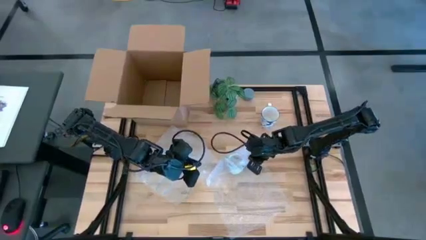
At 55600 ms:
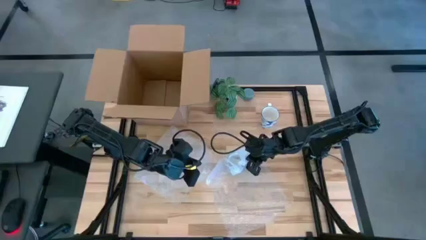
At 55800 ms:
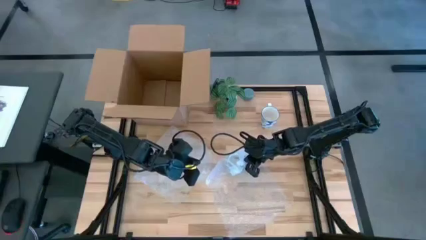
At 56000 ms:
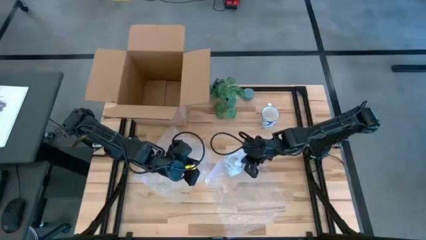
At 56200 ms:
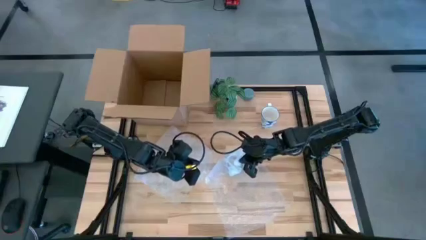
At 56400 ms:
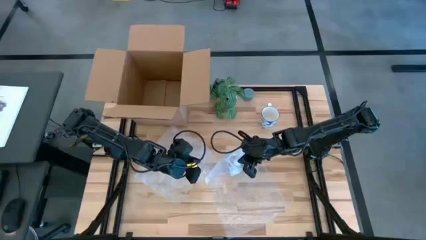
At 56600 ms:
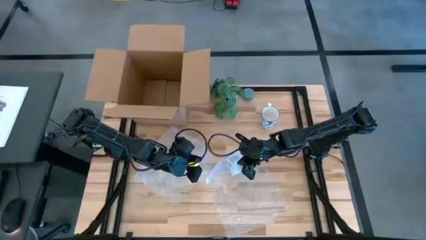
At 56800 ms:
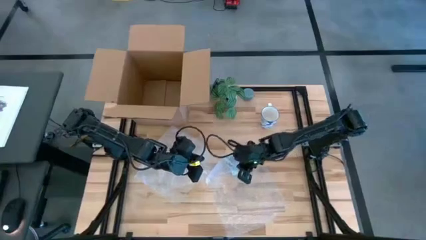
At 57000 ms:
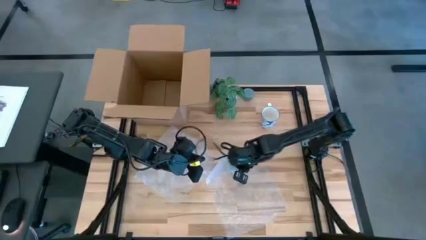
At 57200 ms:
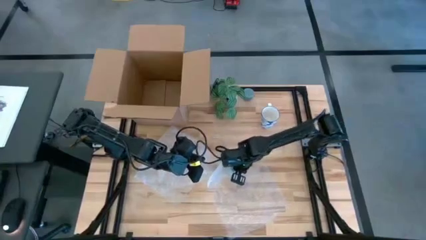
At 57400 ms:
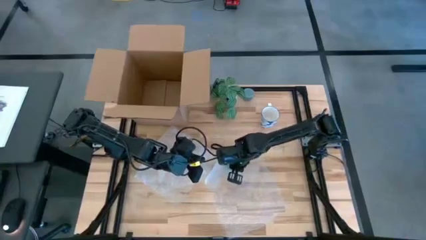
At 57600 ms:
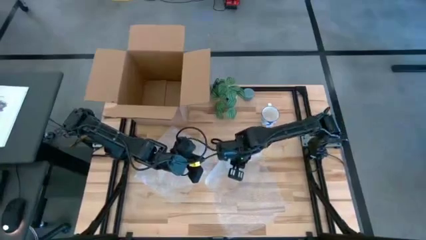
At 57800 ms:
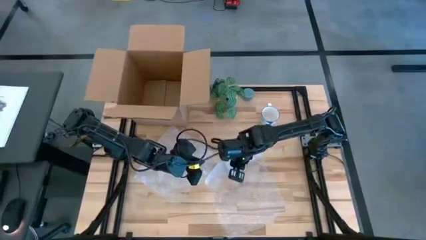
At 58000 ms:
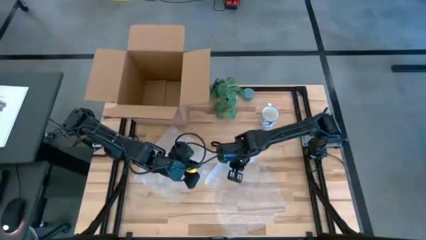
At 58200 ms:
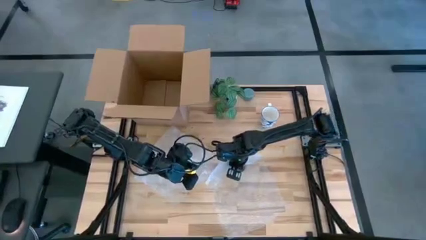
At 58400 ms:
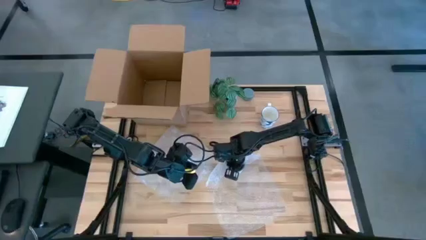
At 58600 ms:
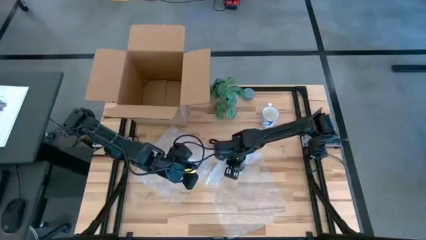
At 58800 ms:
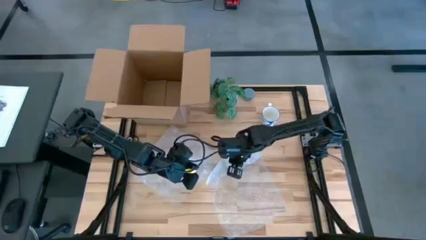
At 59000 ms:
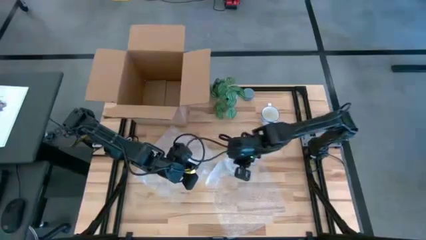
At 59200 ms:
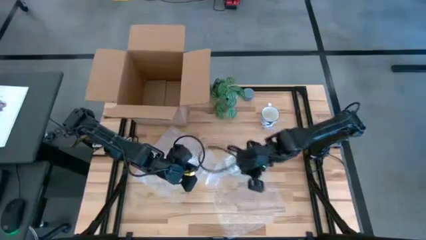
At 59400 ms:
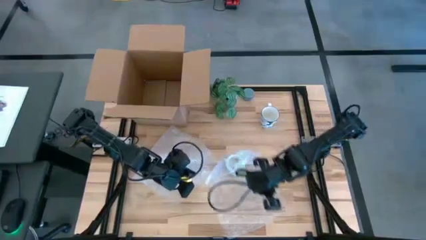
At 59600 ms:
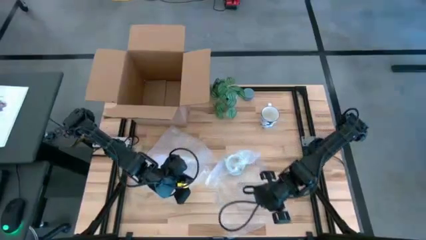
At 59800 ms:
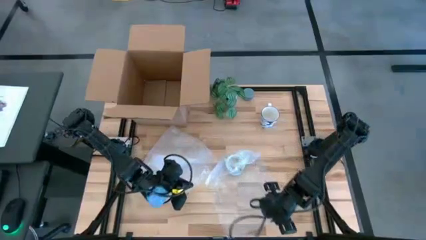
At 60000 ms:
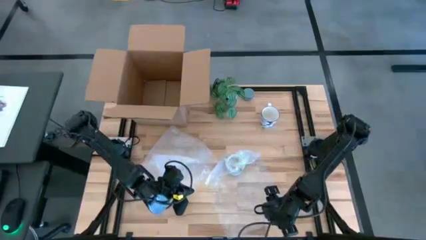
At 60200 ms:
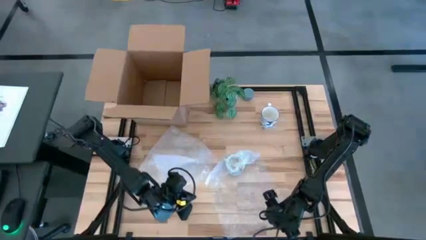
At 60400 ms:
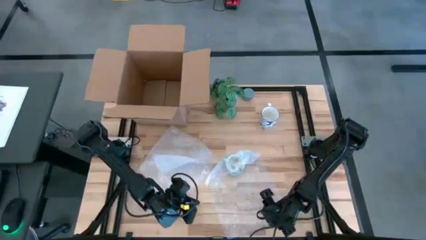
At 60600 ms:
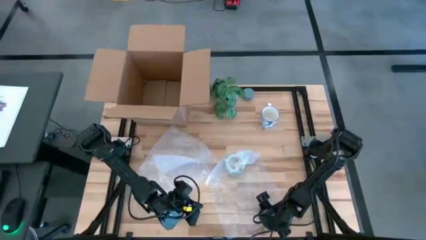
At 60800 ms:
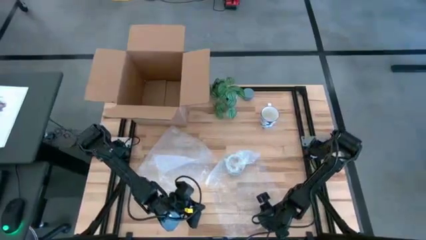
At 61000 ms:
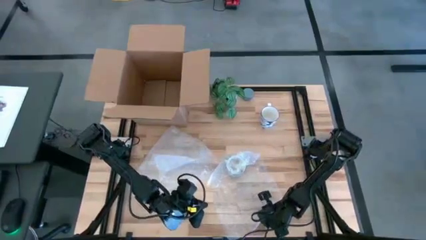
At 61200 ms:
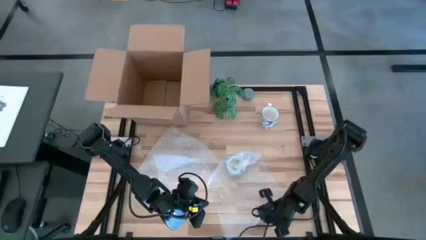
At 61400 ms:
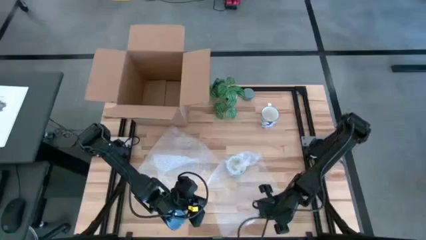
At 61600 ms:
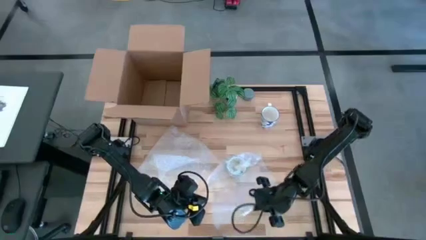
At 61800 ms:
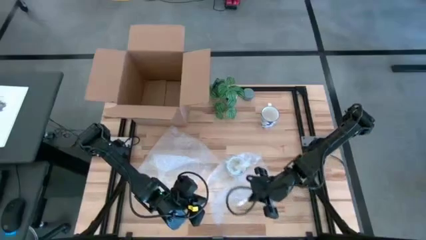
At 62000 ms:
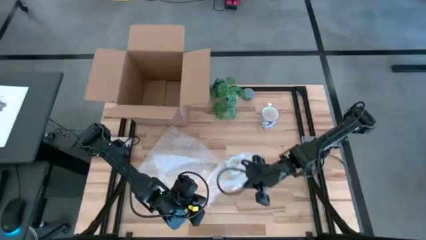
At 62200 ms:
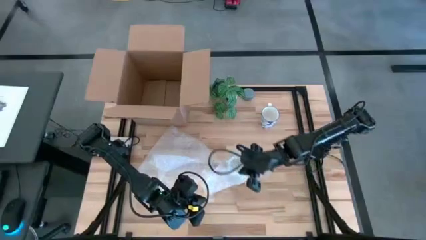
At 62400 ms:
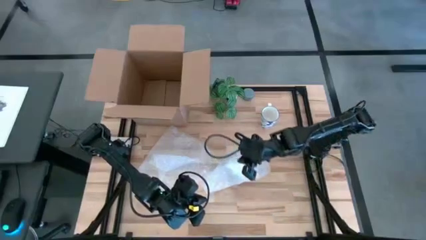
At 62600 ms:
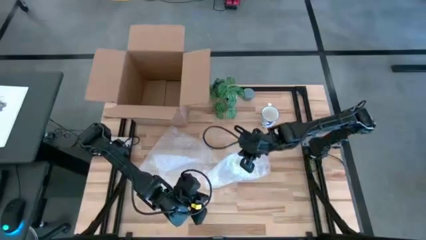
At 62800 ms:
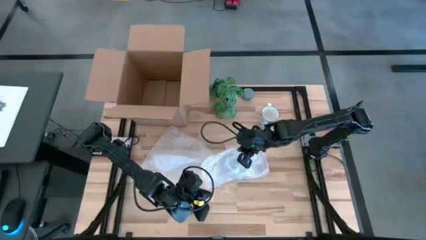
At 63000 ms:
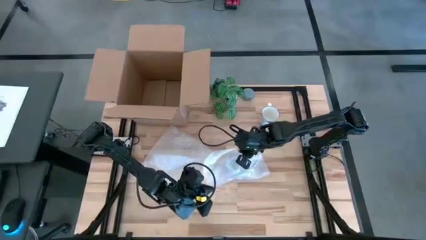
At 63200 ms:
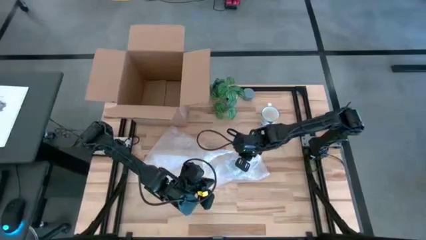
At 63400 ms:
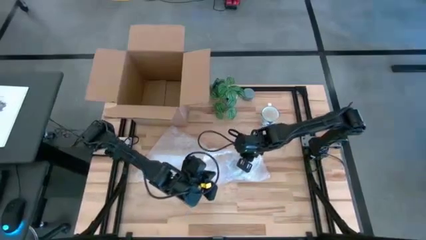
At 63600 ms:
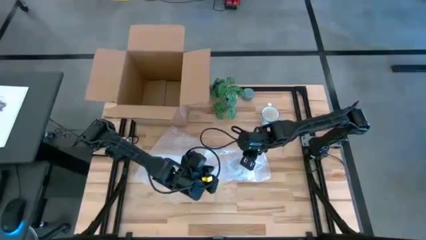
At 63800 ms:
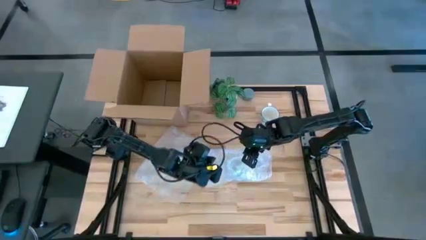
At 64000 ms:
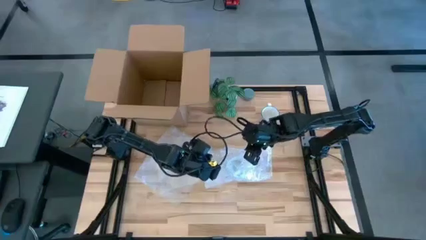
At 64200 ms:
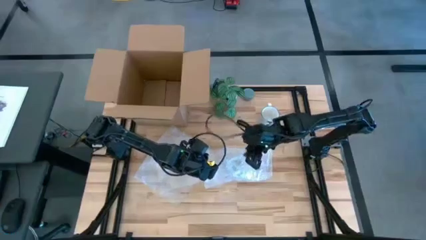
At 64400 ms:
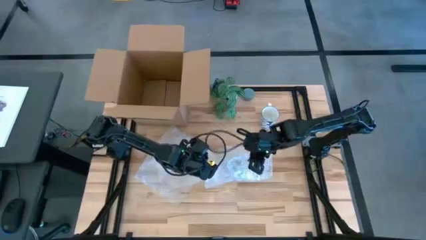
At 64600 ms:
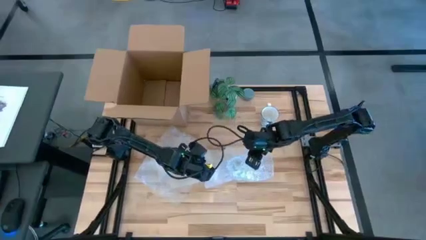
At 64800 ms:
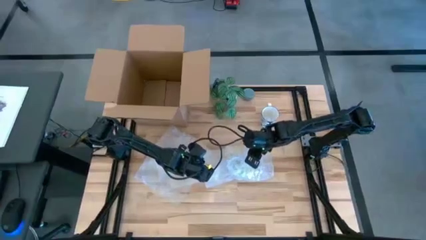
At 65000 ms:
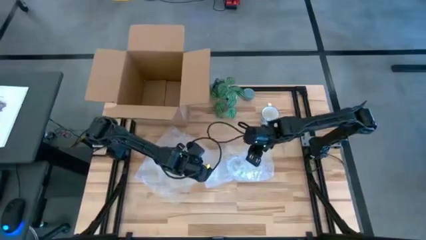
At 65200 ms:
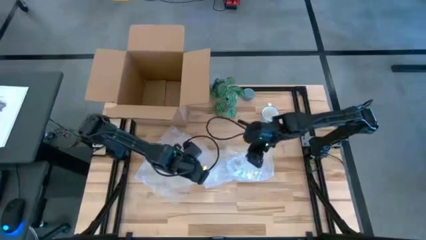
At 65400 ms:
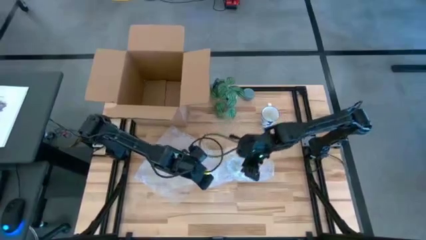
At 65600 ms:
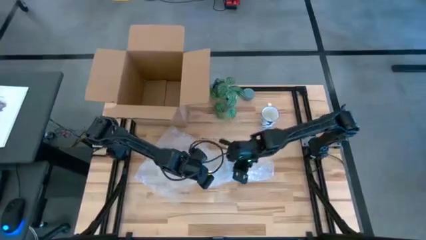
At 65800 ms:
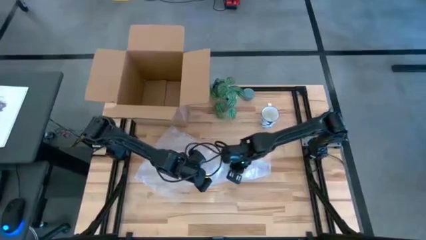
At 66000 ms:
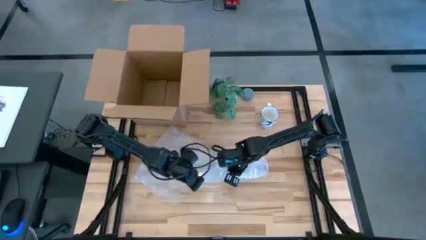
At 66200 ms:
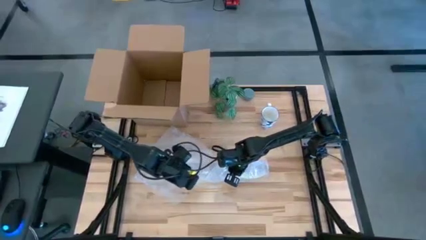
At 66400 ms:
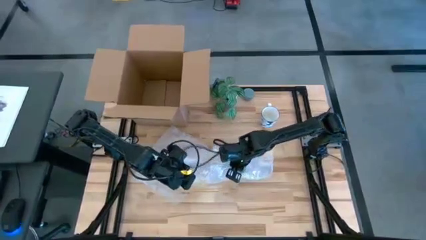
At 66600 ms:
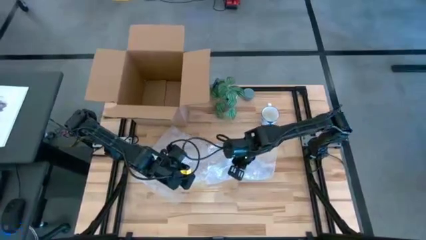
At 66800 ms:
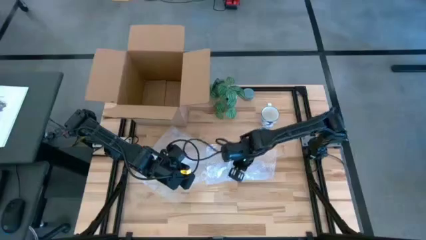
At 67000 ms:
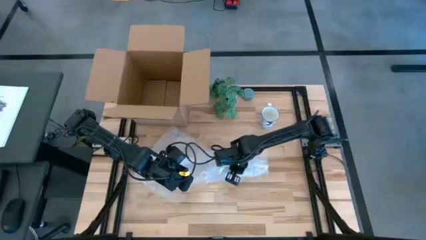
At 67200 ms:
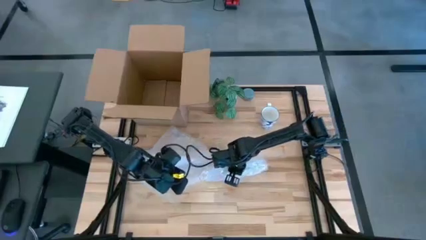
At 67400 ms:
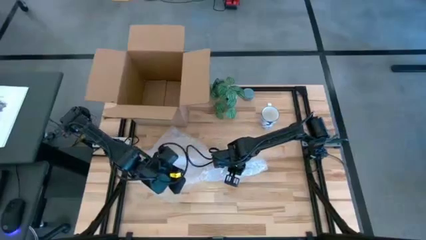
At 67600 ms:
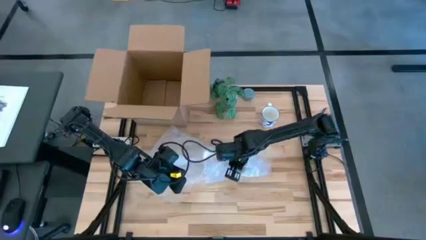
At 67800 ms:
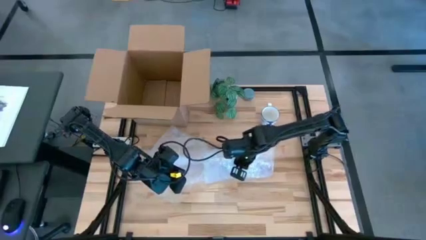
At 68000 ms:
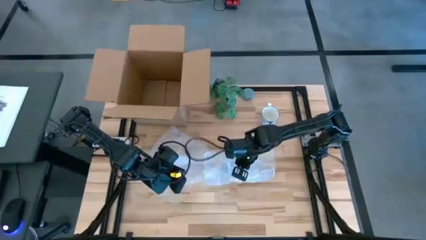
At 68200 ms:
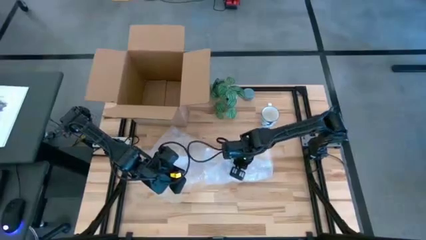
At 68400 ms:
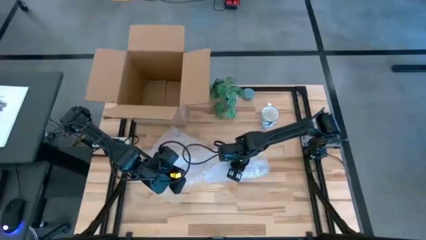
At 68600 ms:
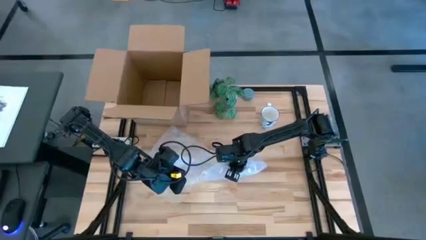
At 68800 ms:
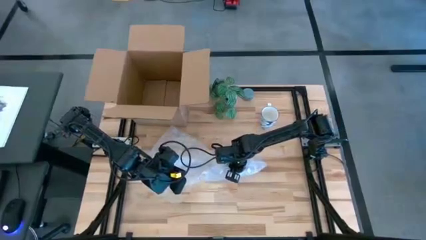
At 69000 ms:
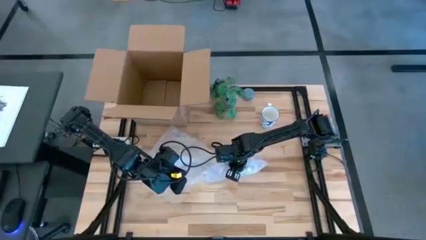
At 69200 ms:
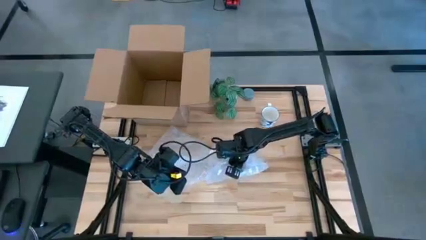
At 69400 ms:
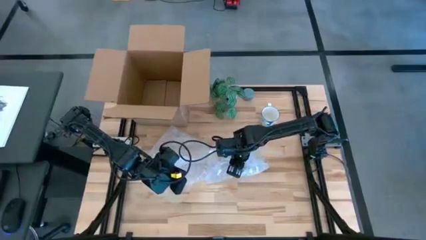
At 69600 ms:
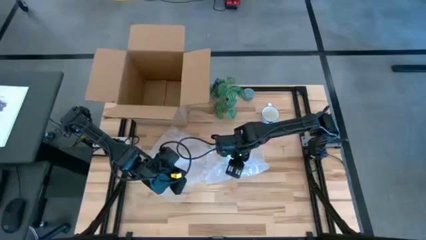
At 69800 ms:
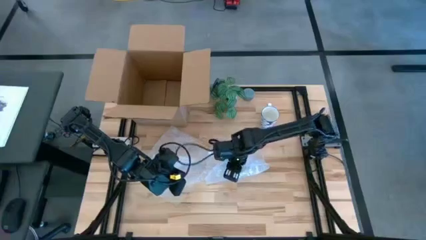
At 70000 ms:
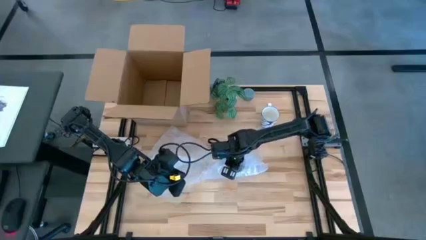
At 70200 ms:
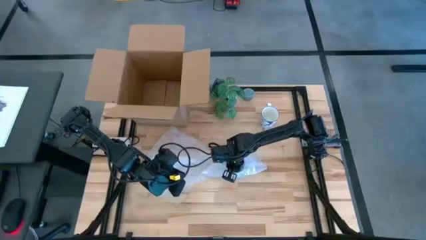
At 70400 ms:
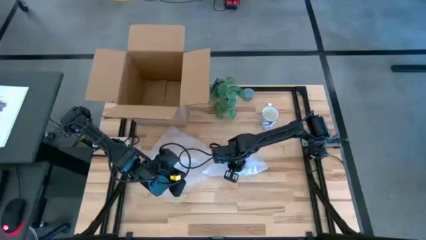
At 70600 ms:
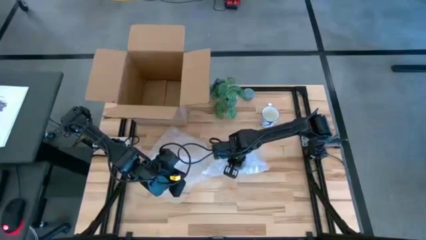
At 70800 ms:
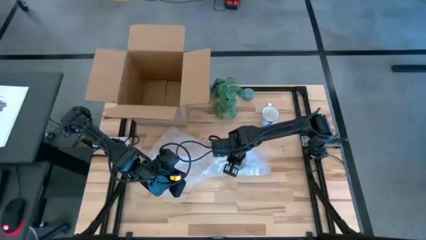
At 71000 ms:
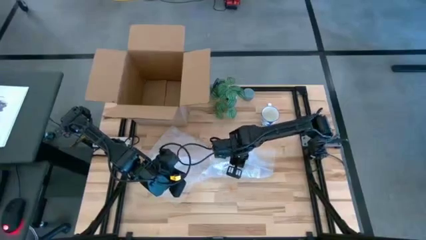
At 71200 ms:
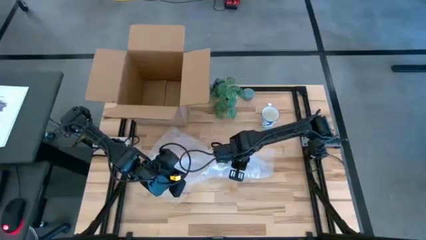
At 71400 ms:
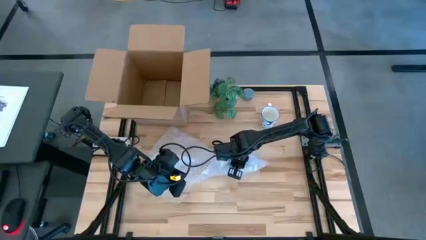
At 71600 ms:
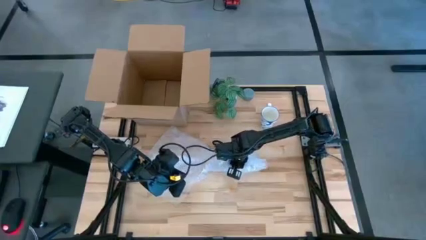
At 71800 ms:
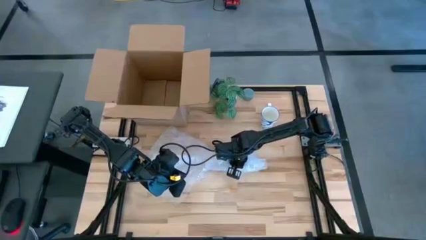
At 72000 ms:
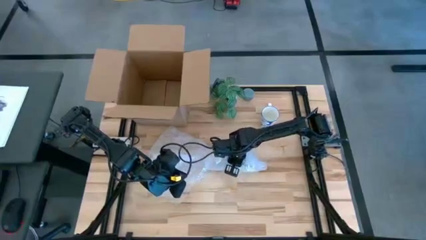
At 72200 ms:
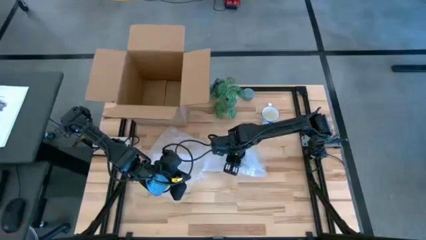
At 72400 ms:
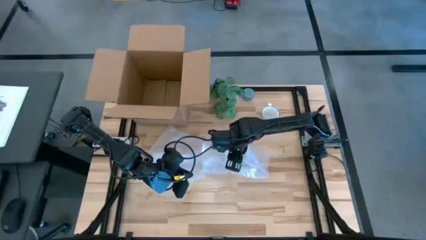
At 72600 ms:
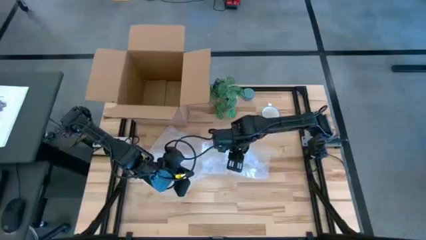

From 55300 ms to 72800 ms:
Task: wrap mug
Wrap the green mug with the bubble wrap
